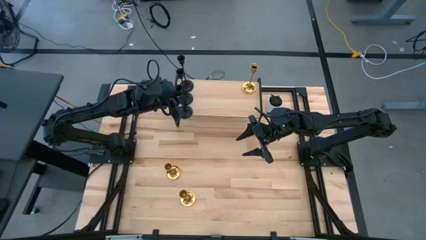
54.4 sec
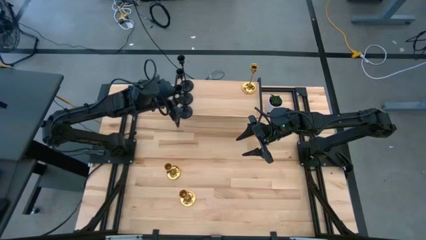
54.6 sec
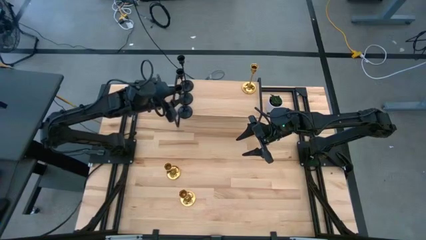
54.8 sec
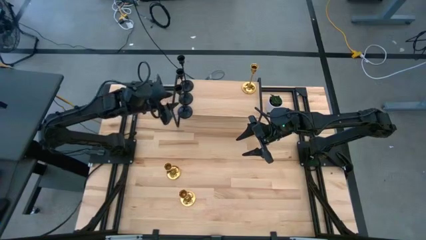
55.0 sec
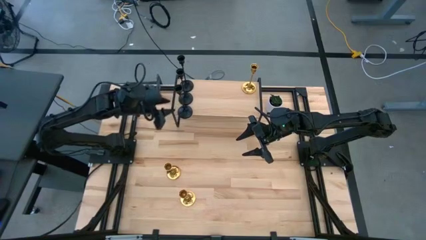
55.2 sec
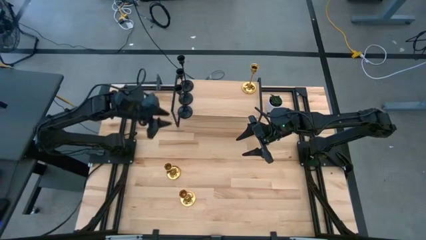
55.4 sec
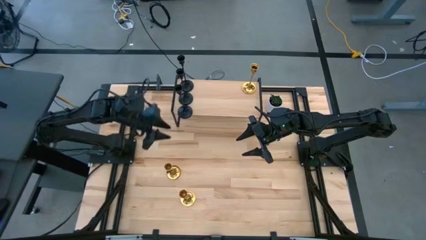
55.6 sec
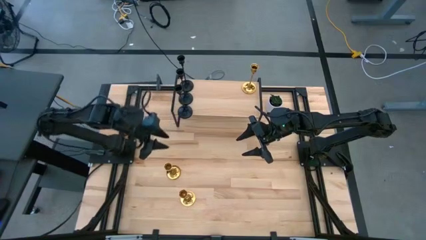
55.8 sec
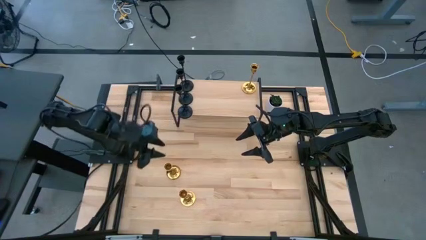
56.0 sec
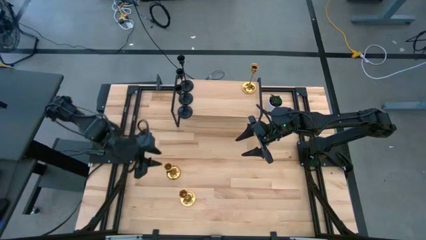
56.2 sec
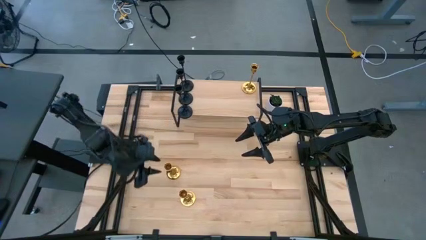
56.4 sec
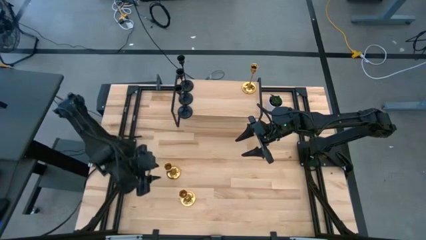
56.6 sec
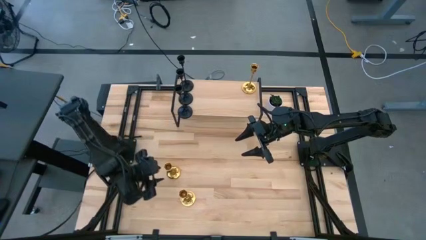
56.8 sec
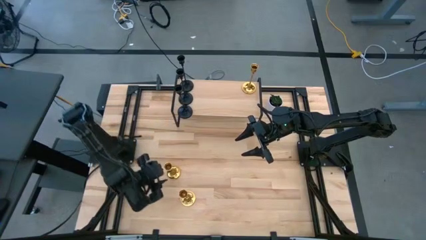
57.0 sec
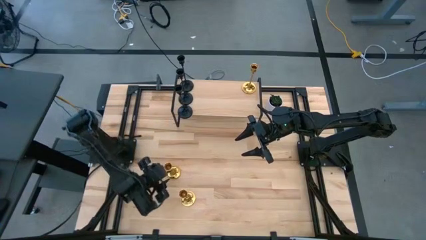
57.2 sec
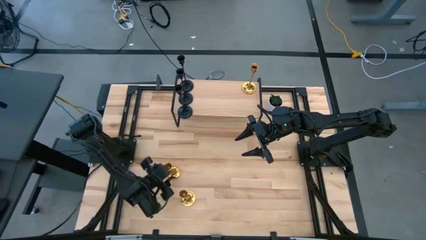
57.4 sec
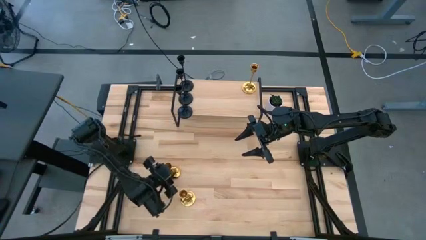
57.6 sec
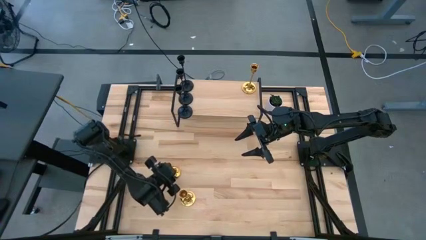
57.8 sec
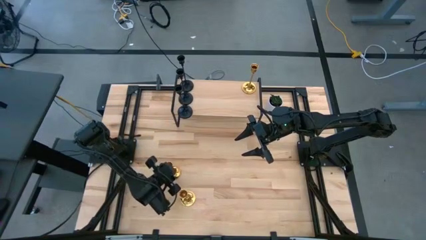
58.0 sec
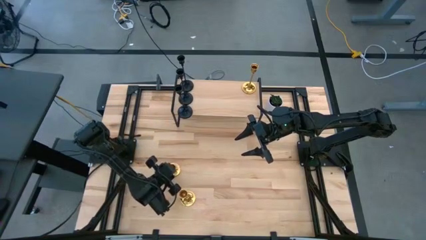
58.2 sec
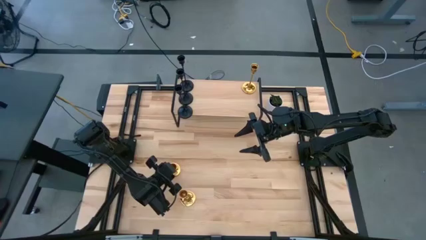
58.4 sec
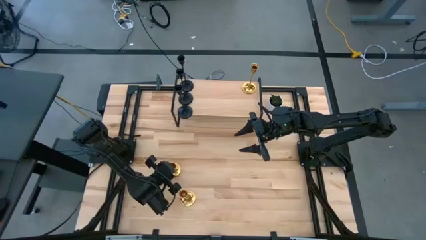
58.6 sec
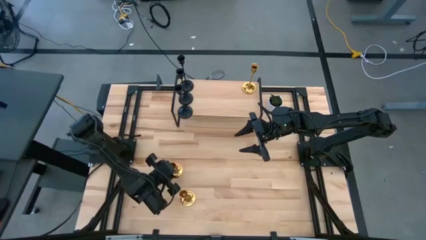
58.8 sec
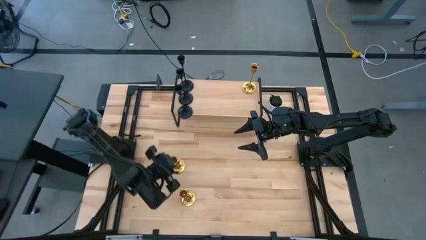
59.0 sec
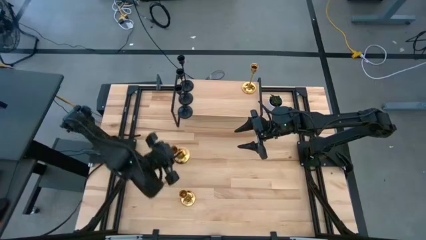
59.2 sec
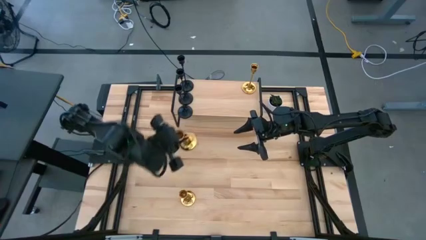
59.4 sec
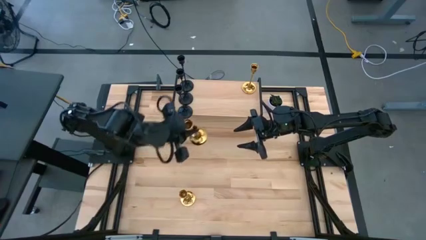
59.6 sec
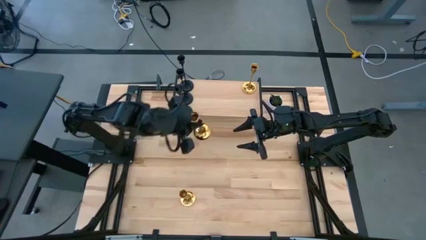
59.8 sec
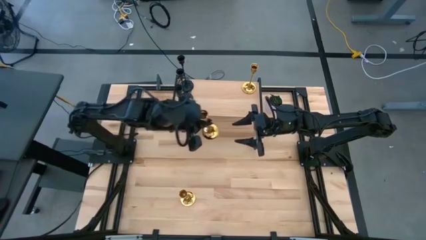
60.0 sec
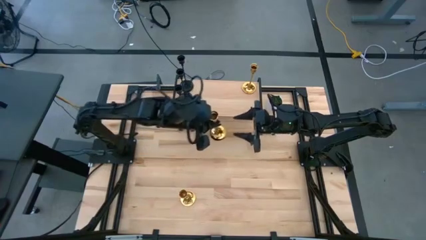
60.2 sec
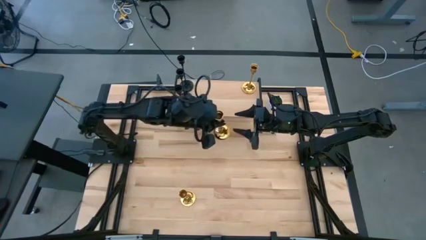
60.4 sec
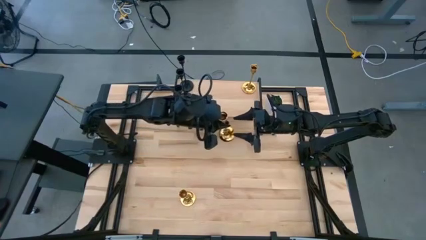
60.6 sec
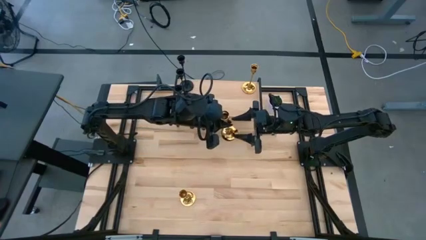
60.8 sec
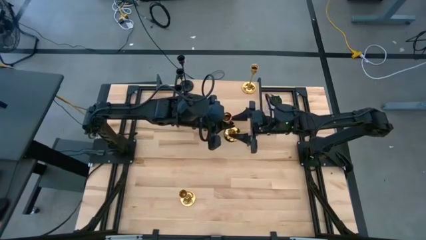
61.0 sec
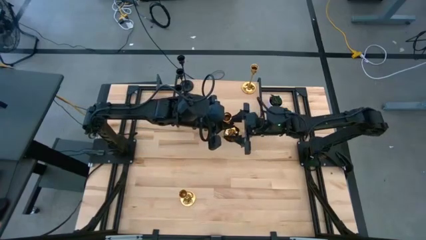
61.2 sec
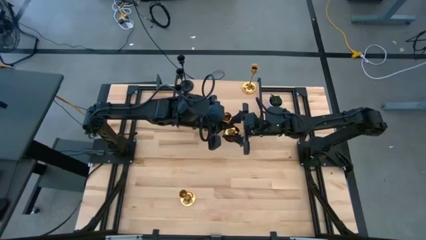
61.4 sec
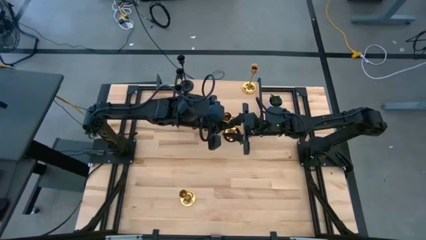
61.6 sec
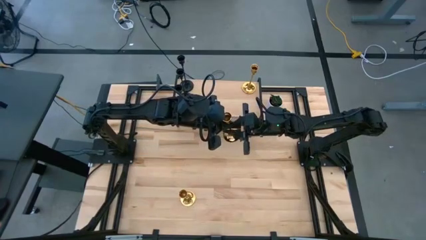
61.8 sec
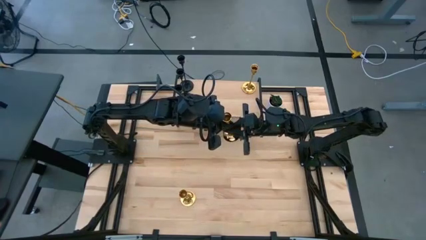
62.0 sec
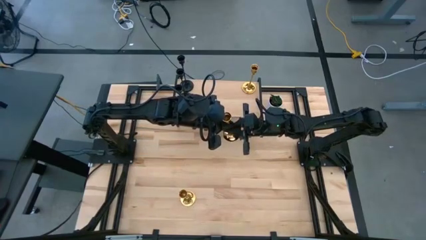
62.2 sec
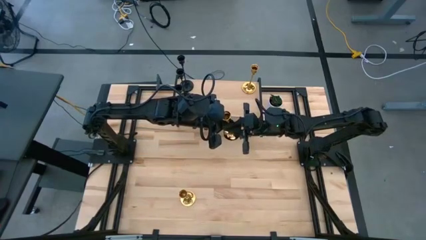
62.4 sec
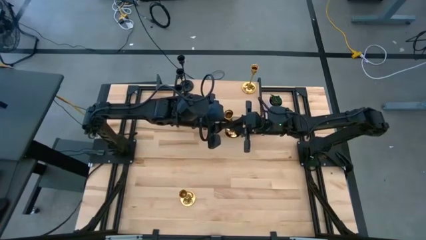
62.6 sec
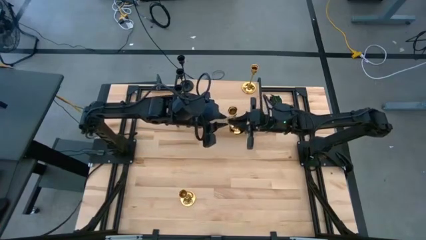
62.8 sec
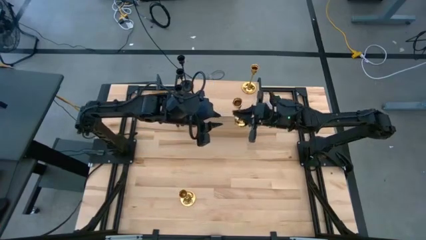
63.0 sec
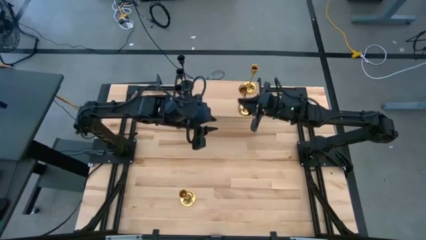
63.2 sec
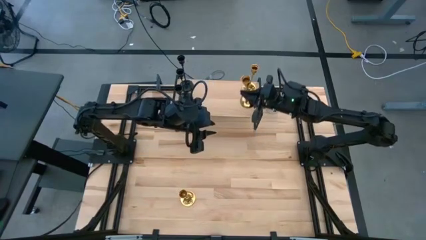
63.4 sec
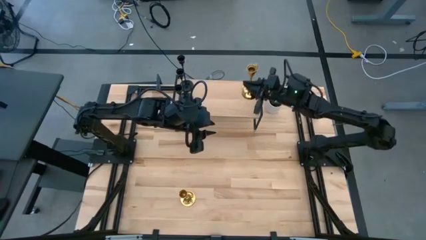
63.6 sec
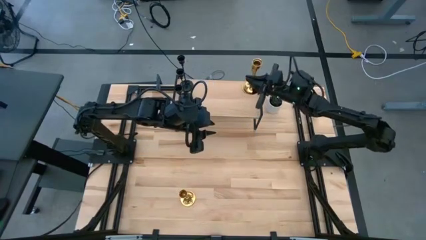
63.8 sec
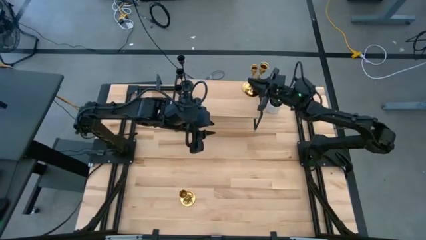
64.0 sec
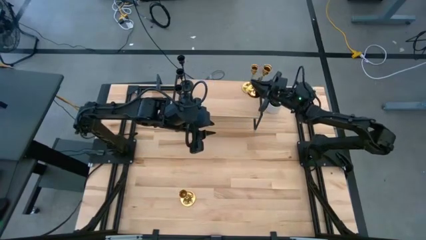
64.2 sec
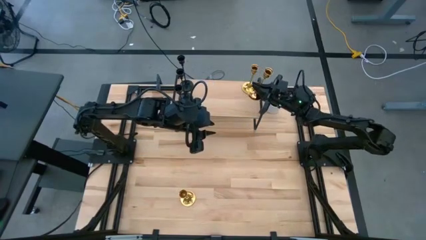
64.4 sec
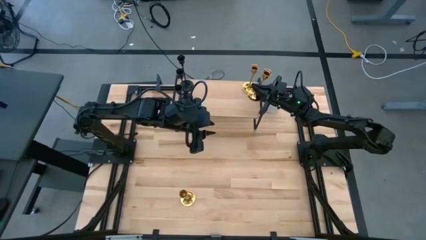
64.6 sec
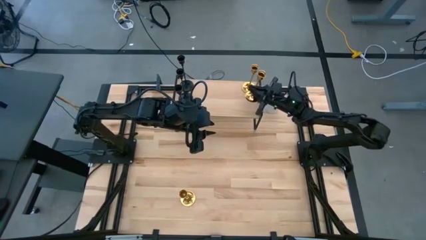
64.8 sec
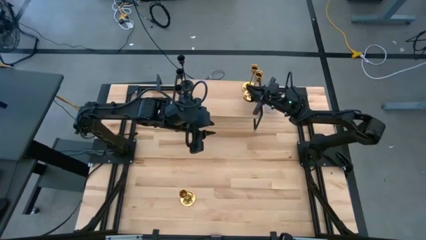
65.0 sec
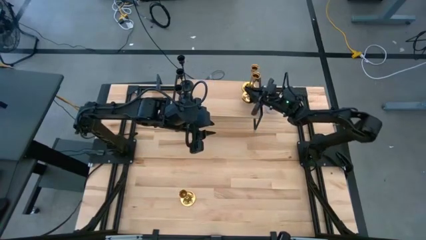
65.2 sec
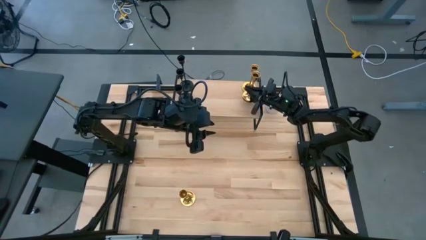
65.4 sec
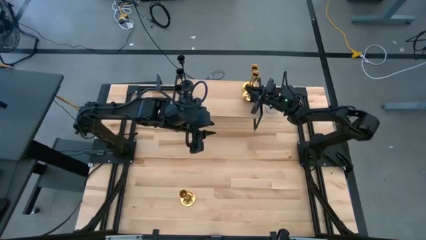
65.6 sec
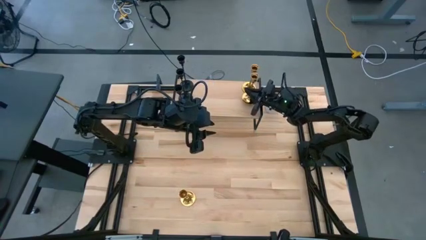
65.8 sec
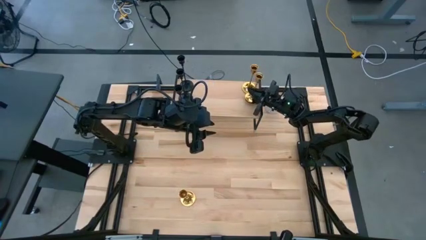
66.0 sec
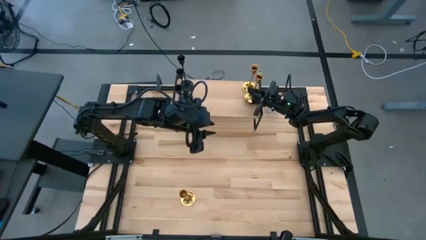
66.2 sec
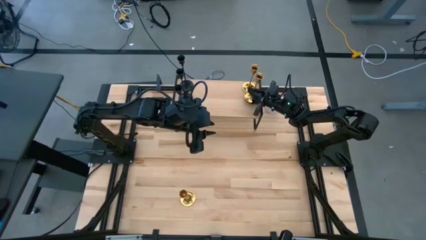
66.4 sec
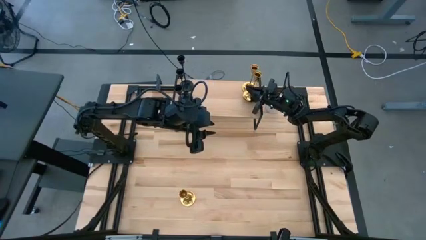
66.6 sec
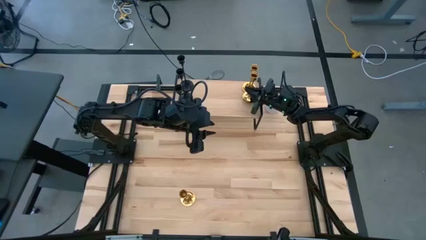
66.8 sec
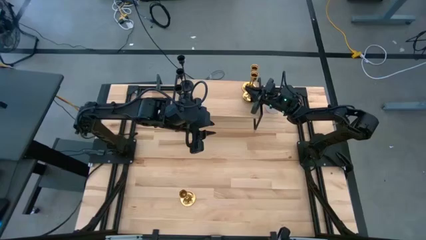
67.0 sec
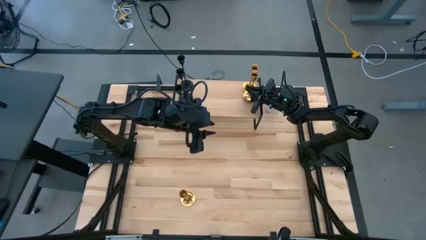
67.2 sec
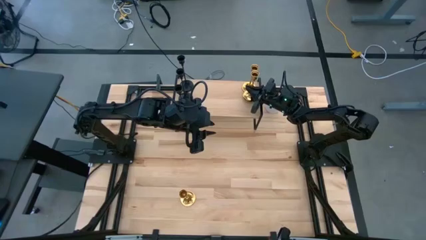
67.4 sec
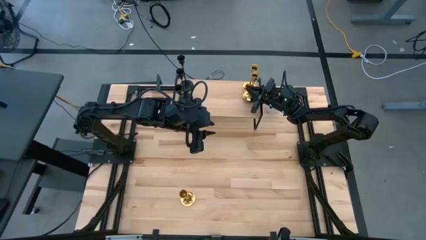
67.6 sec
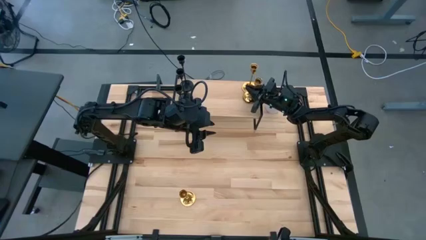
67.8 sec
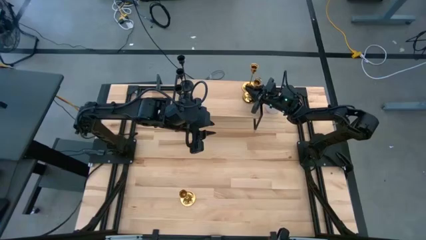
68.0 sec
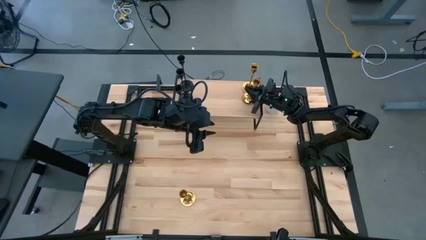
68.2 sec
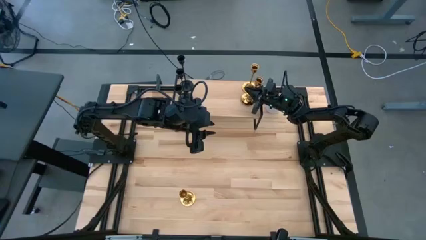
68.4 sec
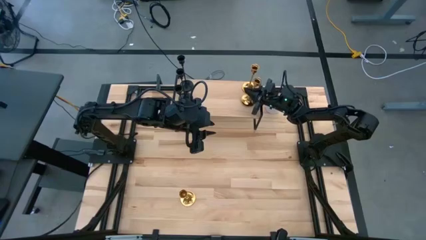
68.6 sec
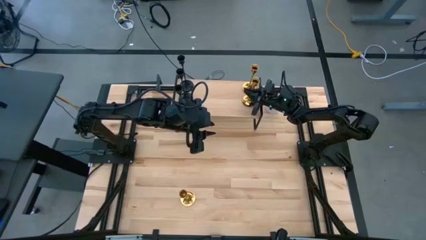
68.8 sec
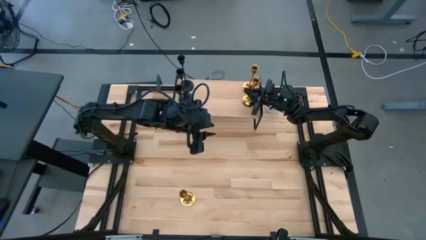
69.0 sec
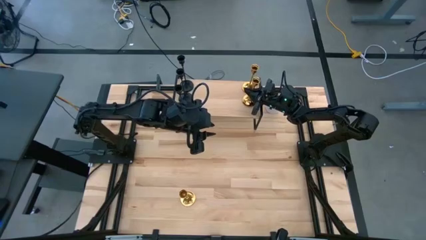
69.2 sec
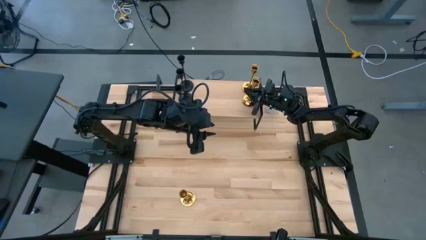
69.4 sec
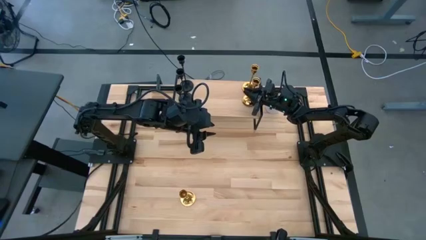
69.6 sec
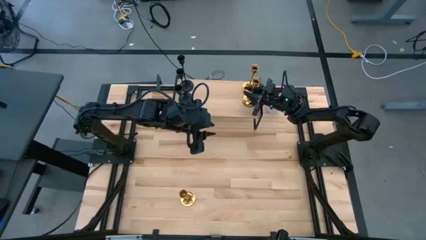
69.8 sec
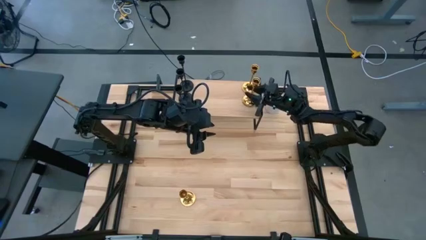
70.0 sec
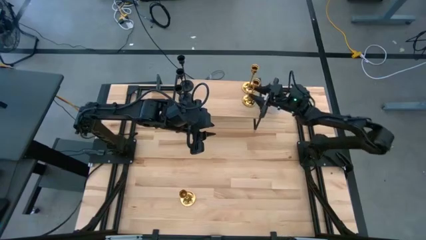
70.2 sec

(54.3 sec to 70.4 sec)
Task: Pick & Place candle stick holders
Put the top gold candle holder on the shelf aligned with the gold candle holder
